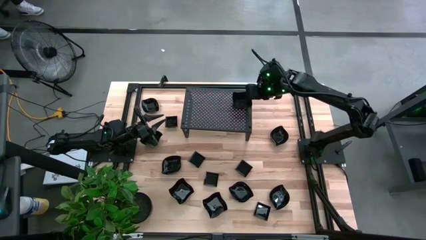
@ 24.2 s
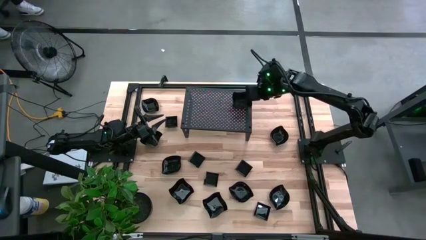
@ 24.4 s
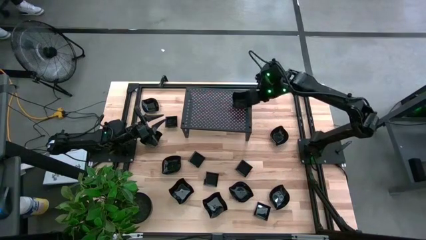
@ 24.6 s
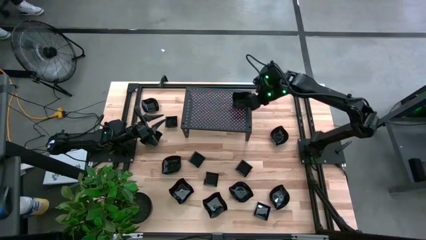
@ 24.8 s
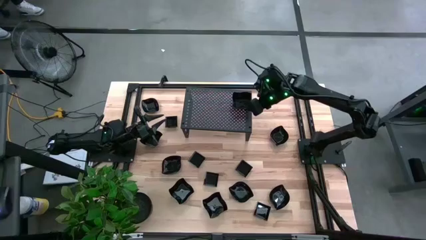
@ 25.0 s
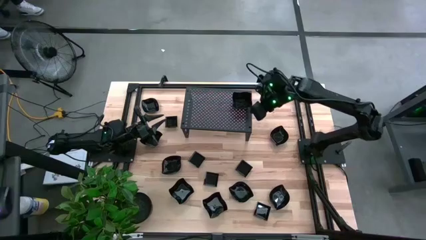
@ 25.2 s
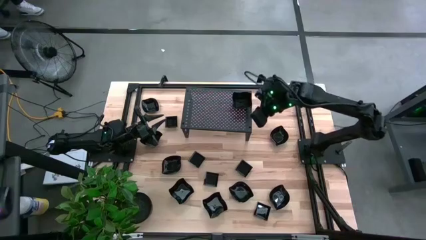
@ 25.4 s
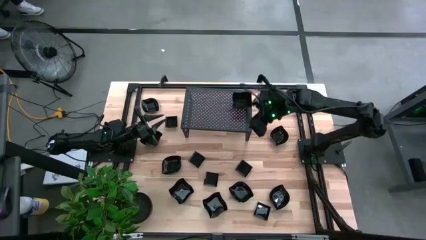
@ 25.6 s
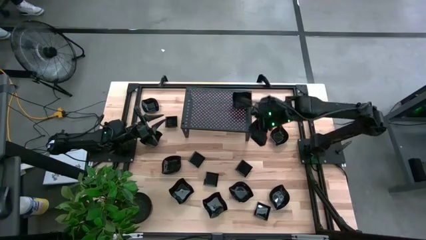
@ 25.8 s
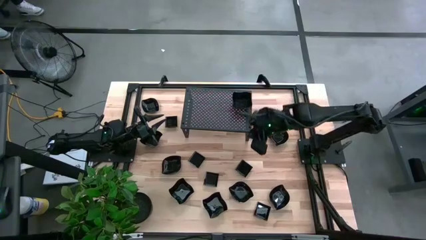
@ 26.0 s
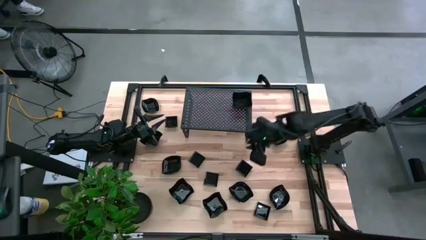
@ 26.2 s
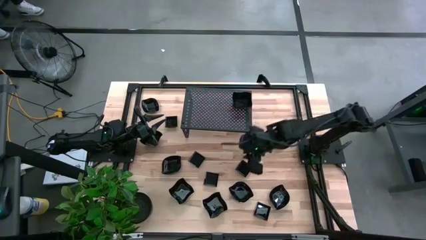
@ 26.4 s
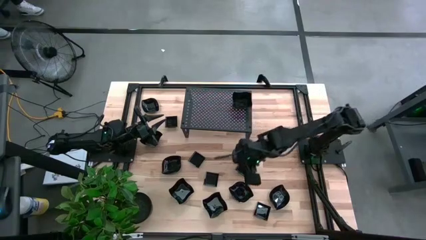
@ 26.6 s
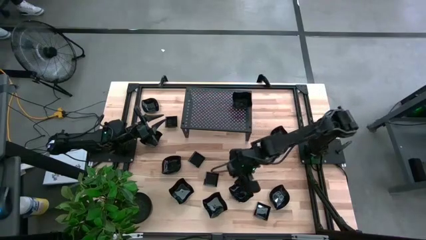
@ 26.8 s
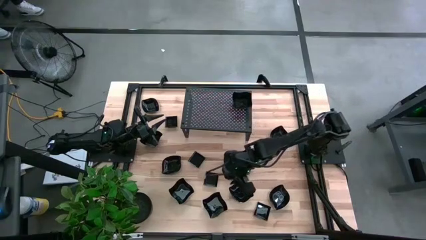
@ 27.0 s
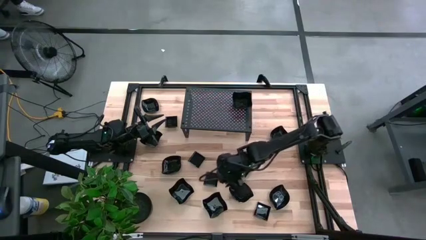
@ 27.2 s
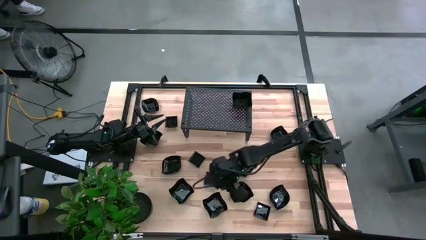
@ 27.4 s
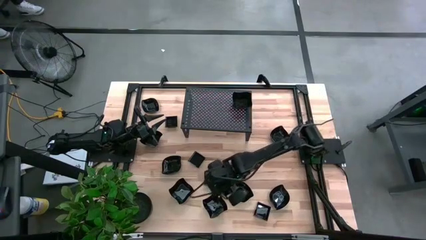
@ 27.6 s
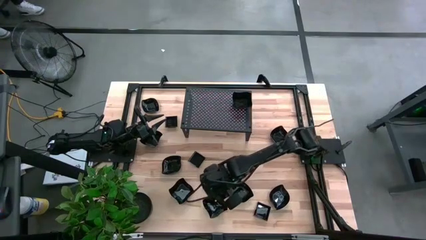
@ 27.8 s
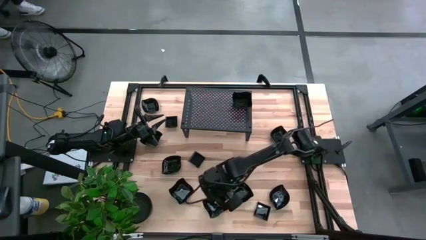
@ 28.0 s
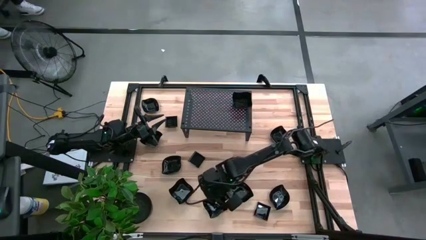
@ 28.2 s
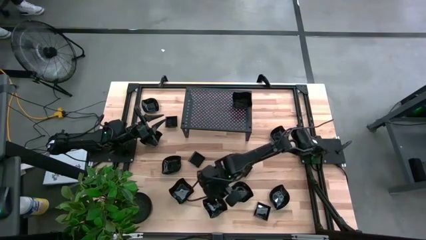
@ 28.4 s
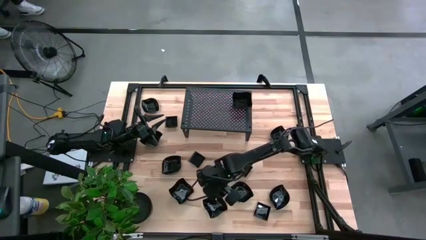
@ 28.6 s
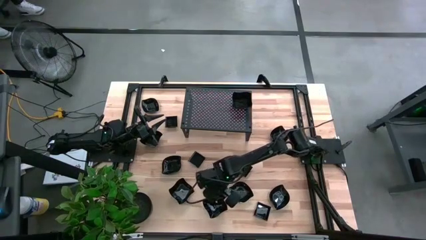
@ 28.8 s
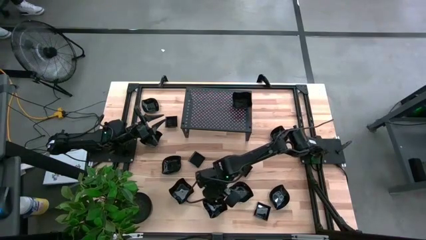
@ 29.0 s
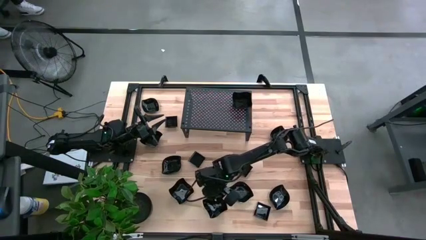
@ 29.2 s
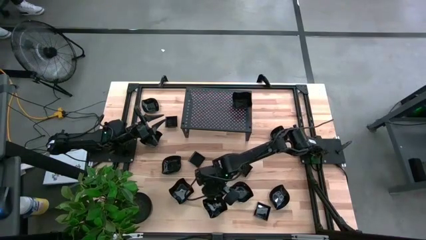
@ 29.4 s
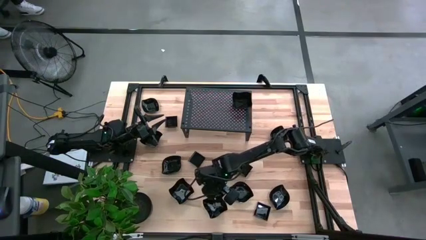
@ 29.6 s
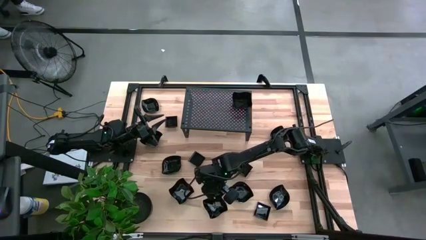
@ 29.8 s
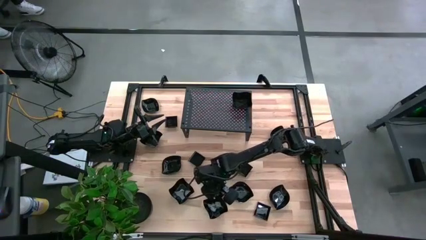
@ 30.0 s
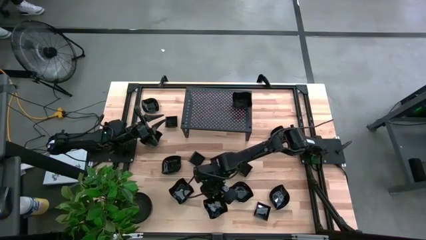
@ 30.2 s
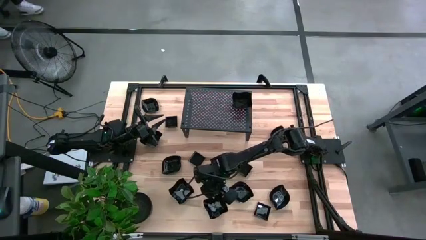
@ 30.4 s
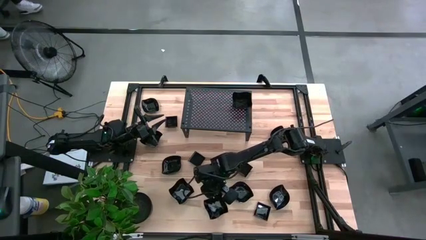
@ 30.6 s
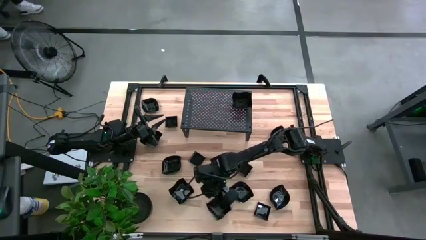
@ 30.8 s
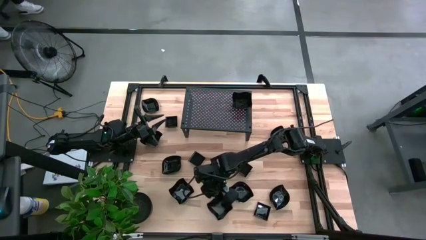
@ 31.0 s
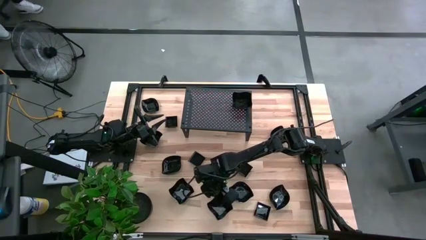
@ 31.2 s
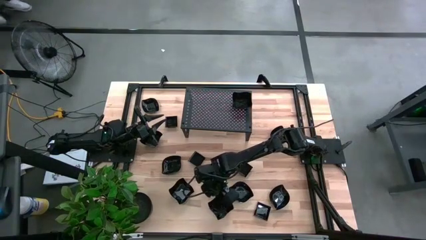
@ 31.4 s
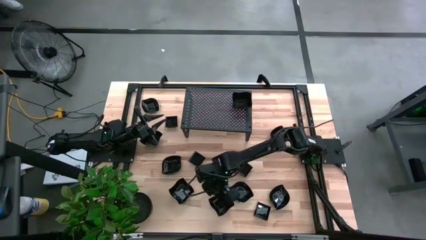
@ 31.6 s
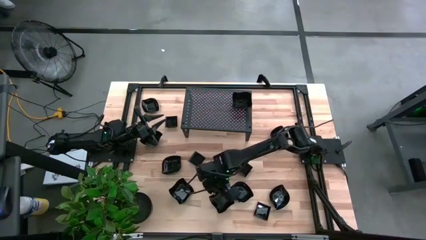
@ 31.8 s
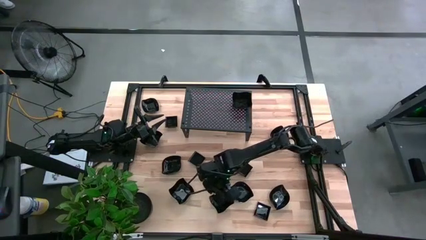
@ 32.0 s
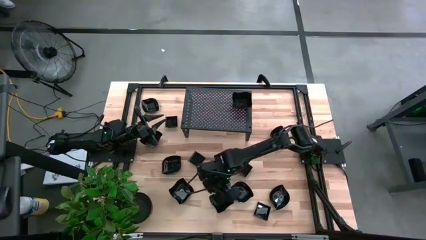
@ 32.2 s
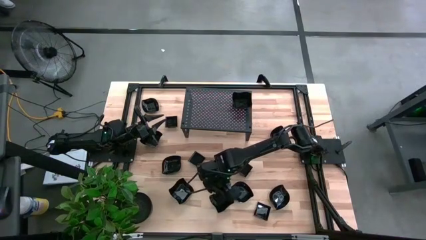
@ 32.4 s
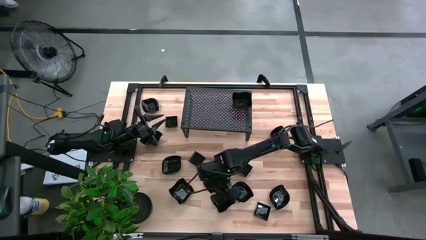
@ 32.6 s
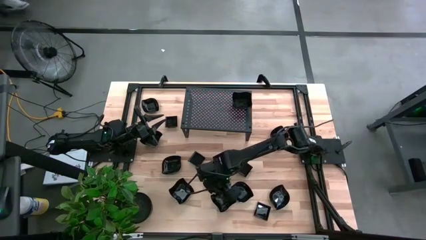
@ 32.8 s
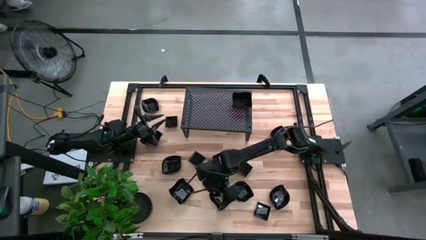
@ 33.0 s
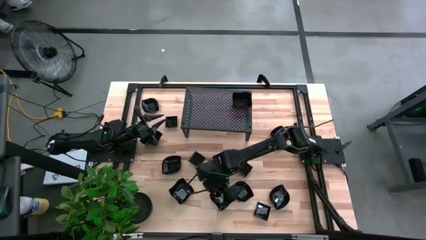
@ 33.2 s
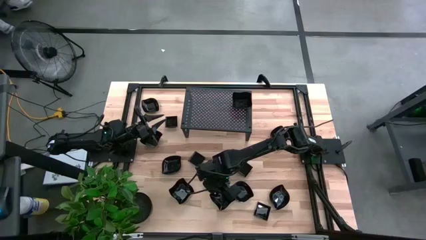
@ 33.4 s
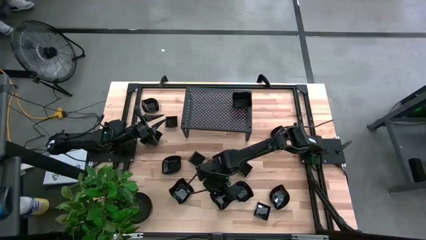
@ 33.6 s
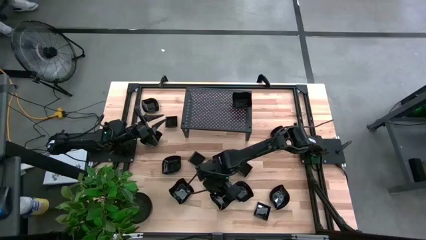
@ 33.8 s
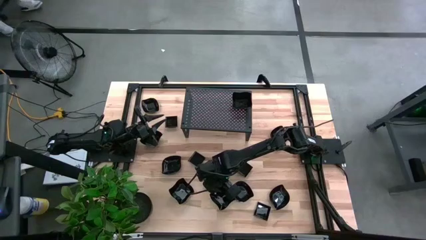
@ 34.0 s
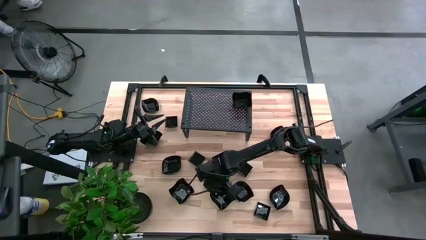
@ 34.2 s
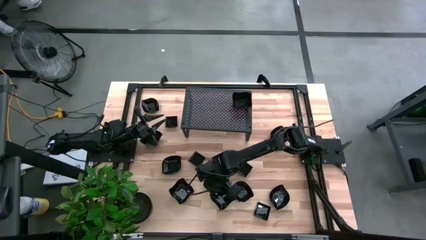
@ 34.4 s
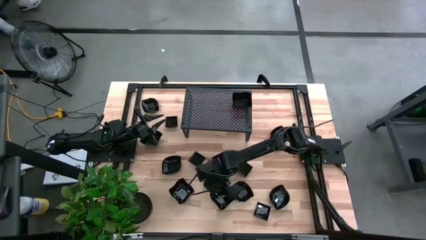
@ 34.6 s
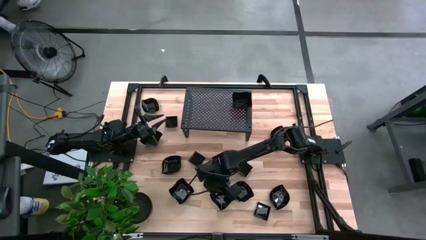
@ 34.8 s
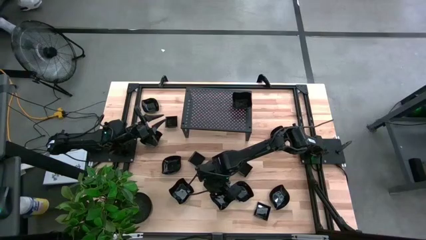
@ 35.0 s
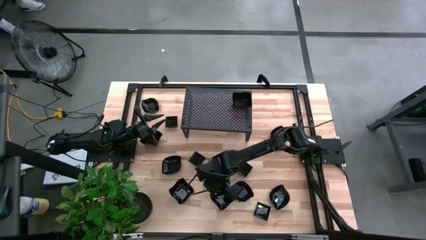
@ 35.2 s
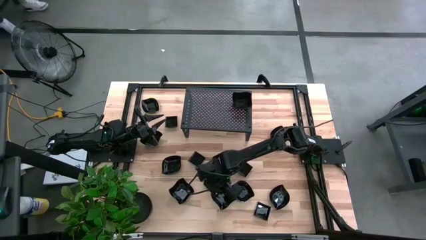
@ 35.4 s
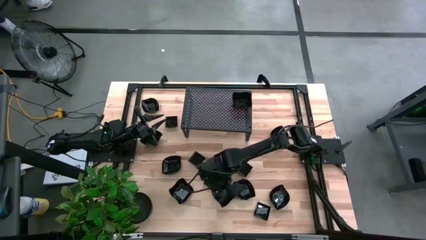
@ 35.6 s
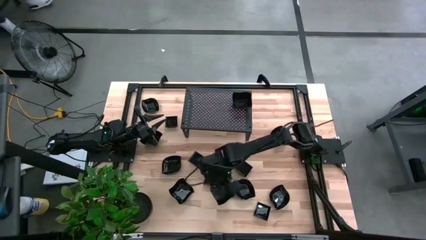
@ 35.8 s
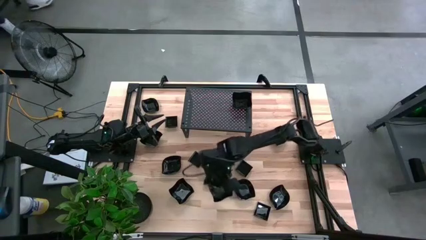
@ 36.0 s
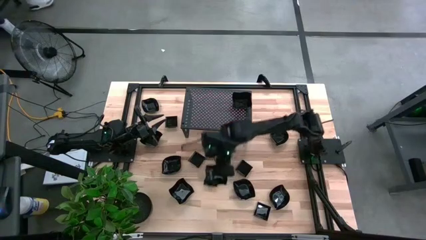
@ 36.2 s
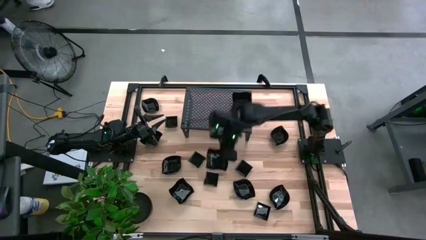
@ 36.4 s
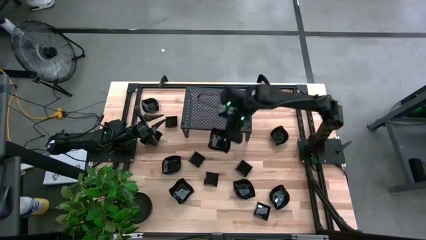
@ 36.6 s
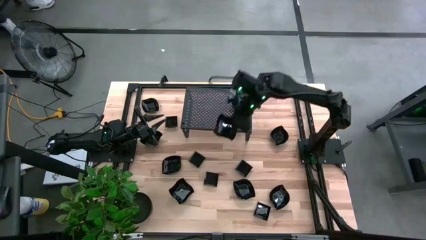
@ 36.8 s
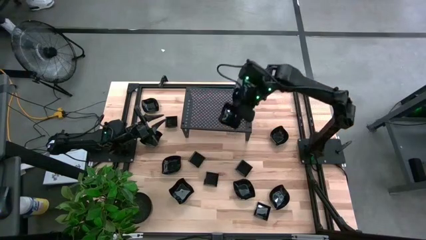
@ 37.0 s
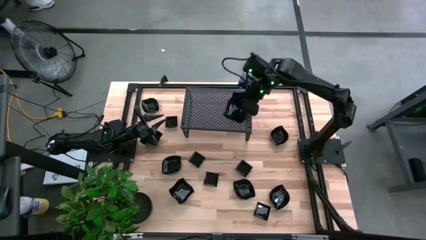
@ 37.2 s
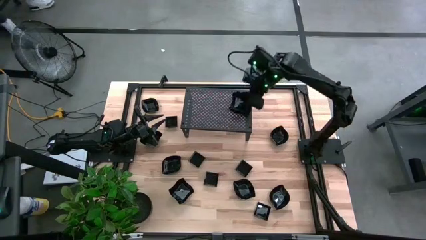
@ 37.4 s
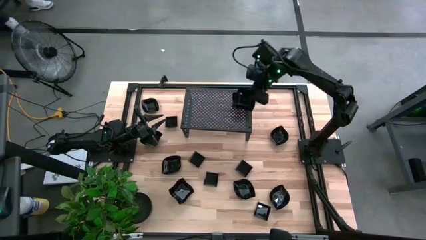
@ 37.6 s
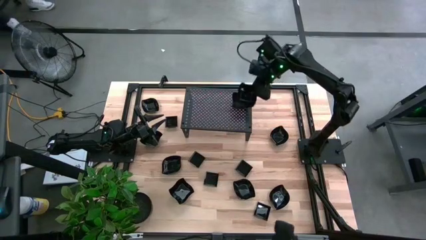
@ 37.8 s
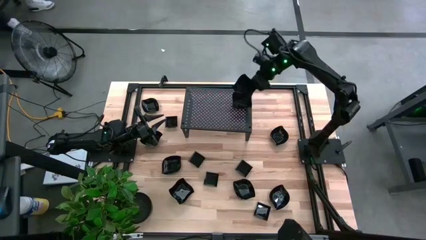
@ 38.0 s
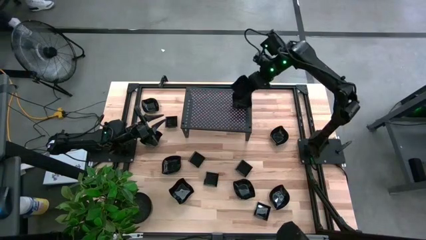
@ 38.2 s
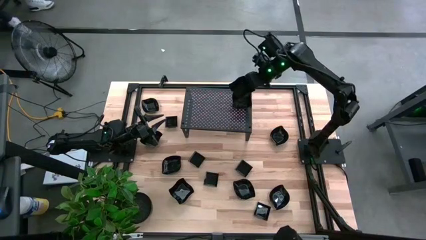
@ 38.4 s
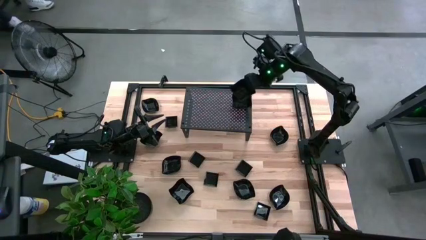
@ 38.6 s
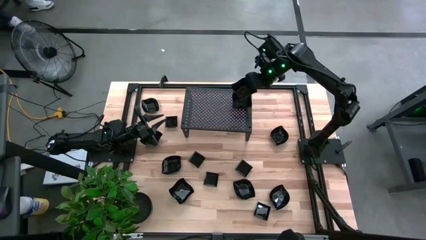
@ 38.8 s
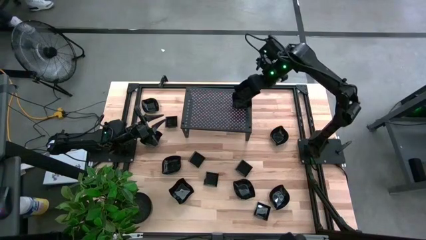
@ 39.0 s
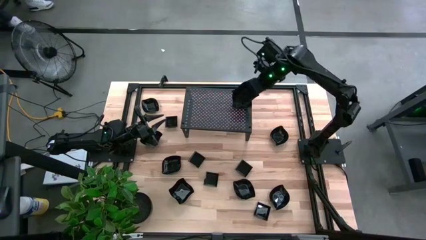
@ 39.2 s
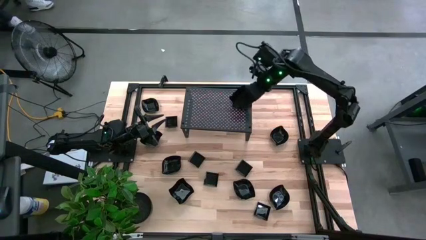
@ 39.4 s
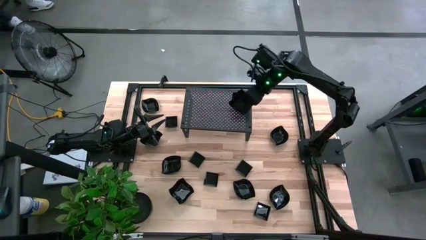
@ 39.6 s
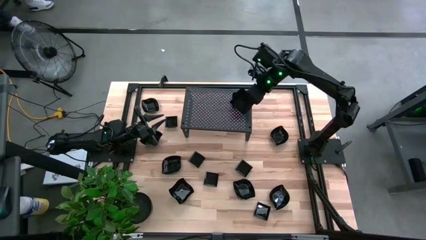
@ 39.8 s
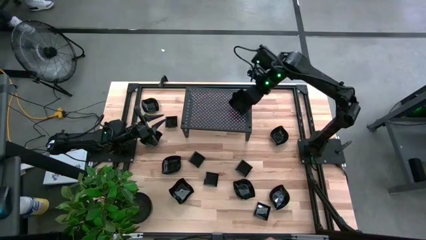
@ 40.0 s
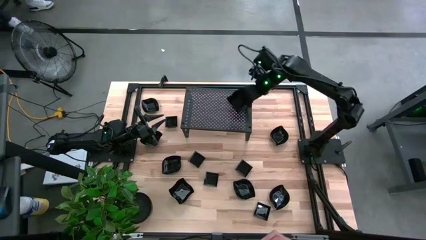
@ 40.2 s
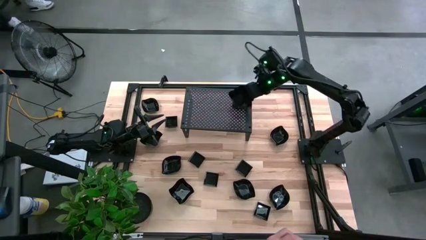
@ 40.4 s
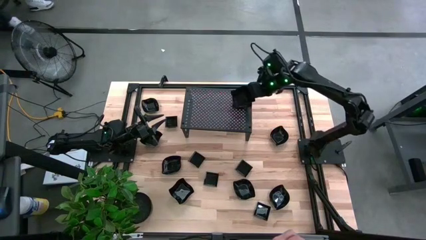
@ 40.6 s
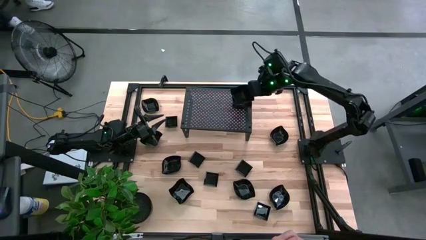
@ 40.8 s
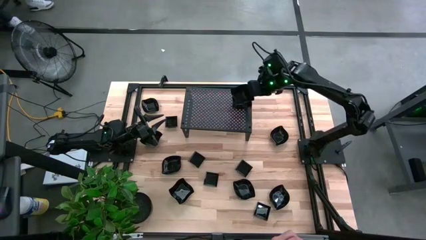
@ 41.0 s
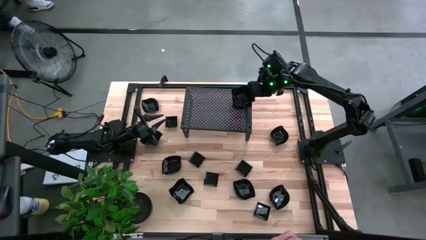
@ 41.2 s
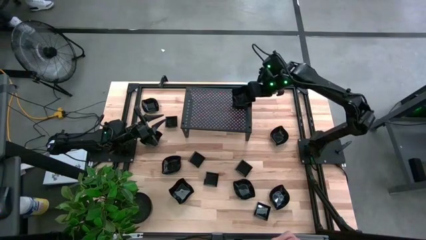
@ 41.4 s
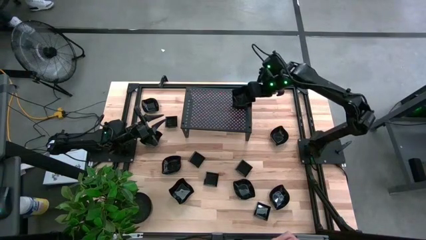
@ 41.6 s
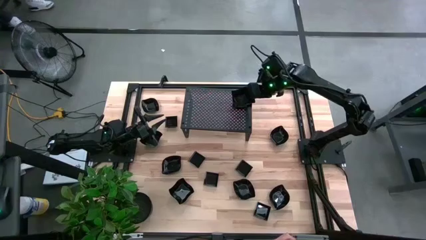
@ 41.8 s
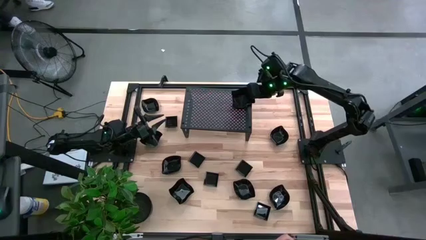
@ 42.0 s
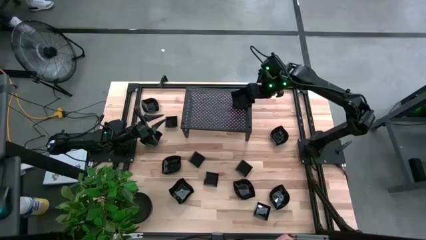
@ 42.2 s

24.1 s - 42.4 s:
Task: Pick & Place Mini shaped plates
Stack the right distorted square plate on the distorted square plates on the shelf
